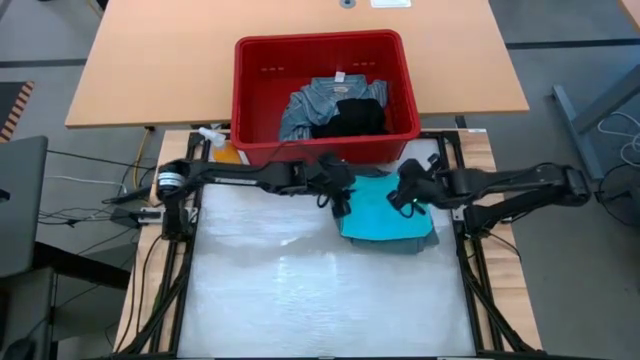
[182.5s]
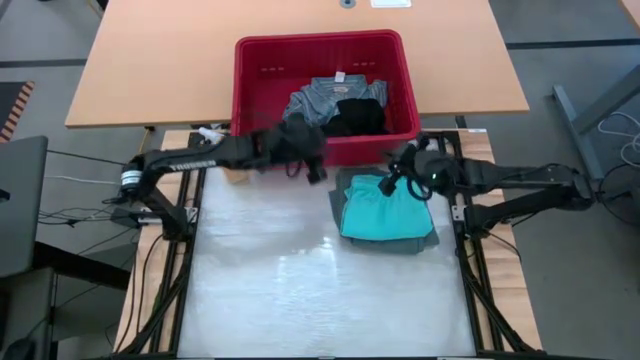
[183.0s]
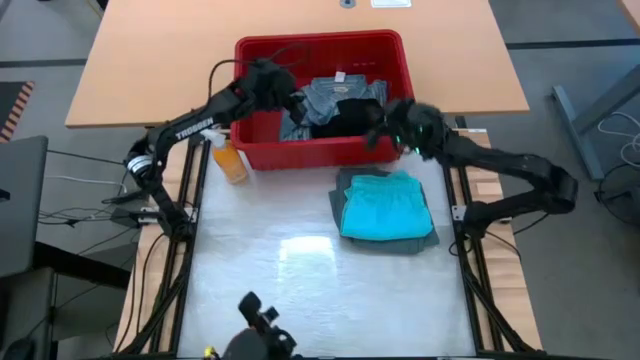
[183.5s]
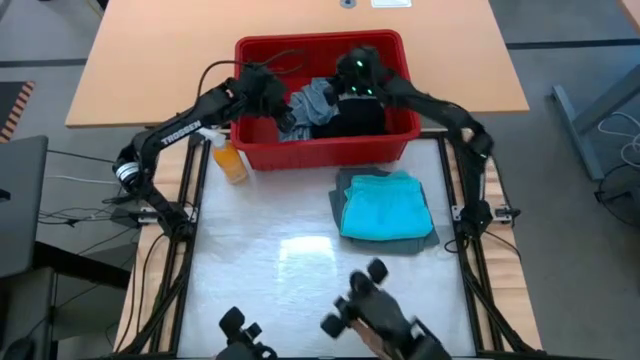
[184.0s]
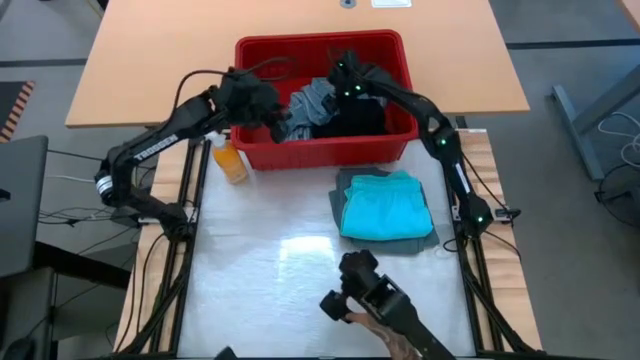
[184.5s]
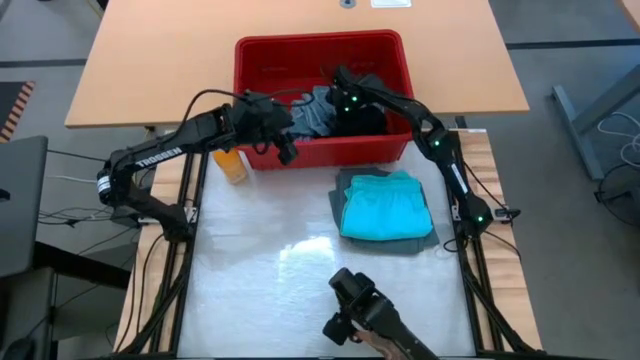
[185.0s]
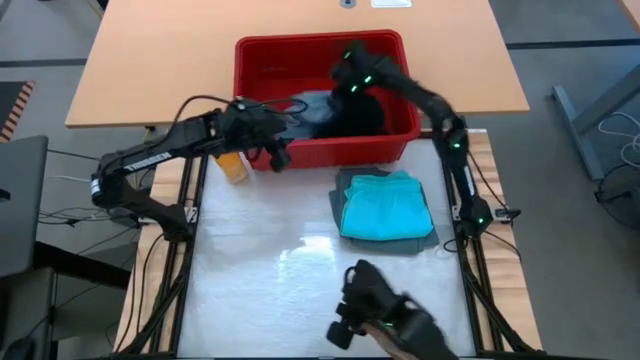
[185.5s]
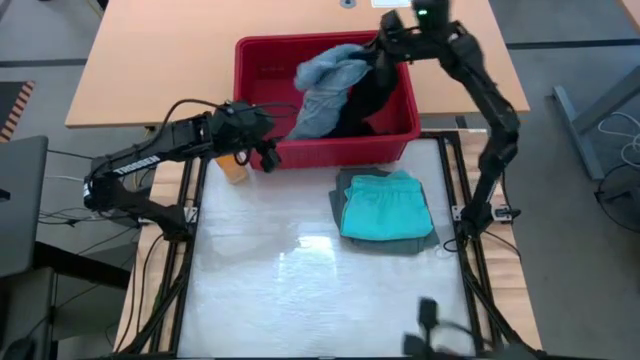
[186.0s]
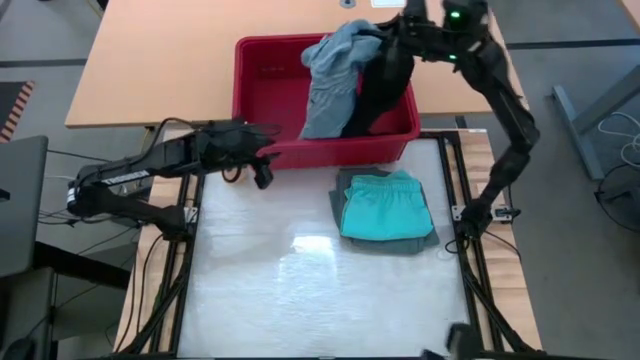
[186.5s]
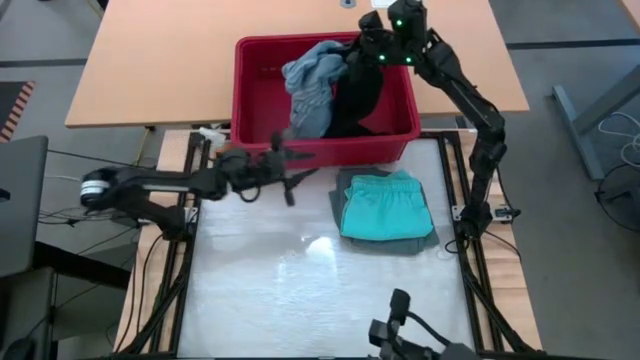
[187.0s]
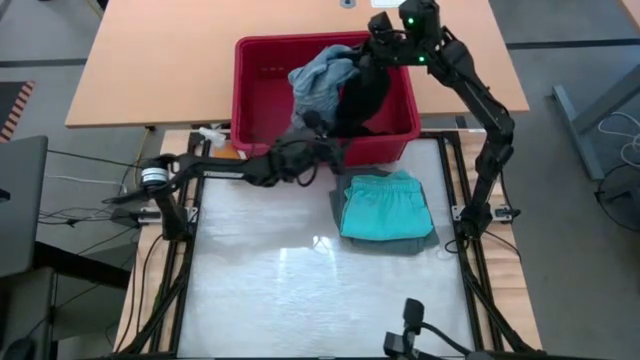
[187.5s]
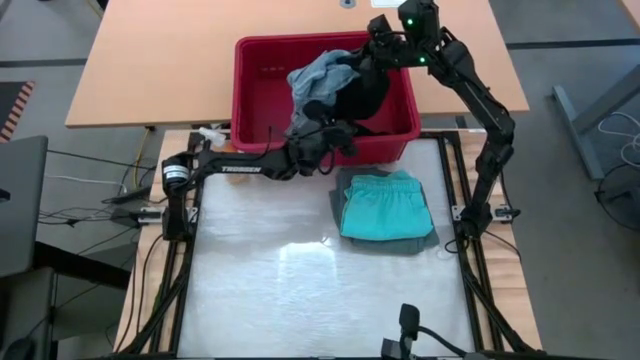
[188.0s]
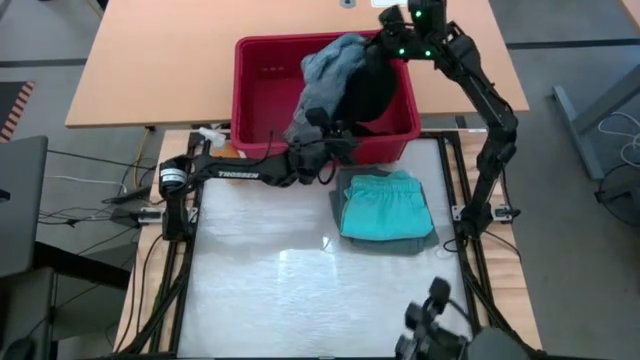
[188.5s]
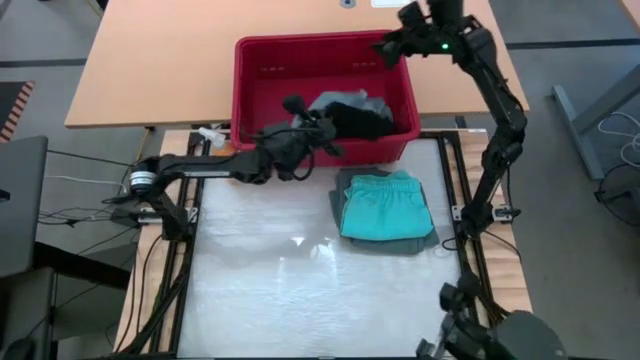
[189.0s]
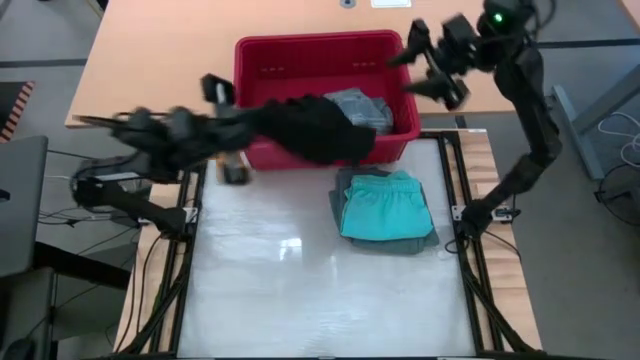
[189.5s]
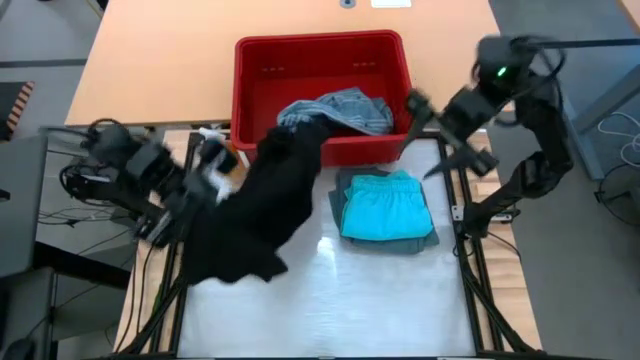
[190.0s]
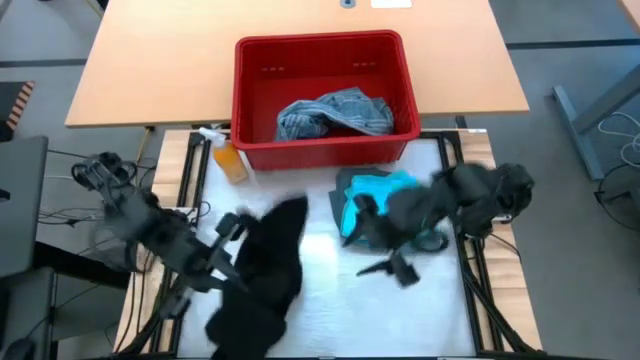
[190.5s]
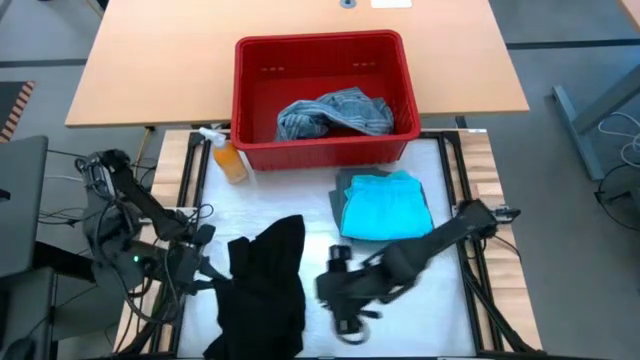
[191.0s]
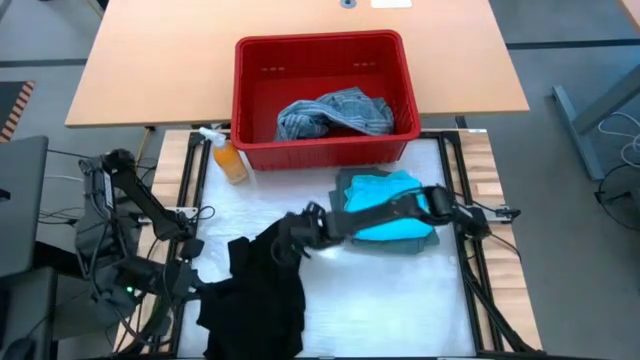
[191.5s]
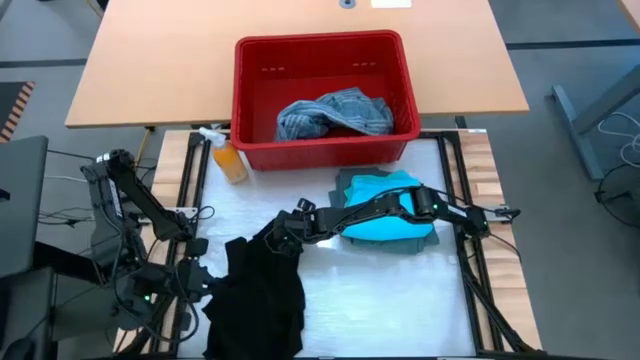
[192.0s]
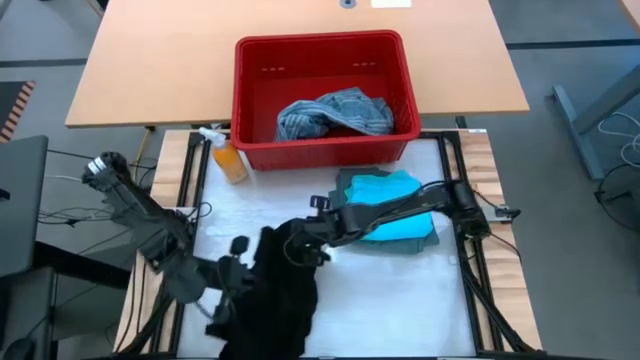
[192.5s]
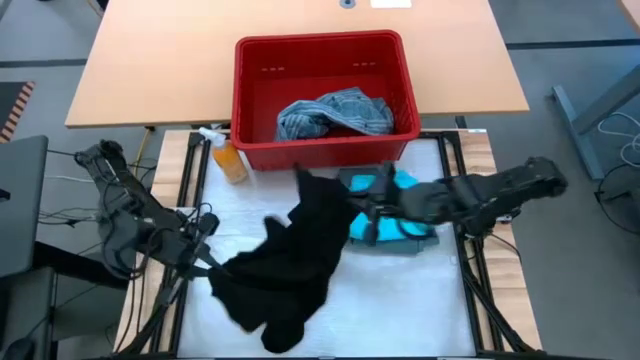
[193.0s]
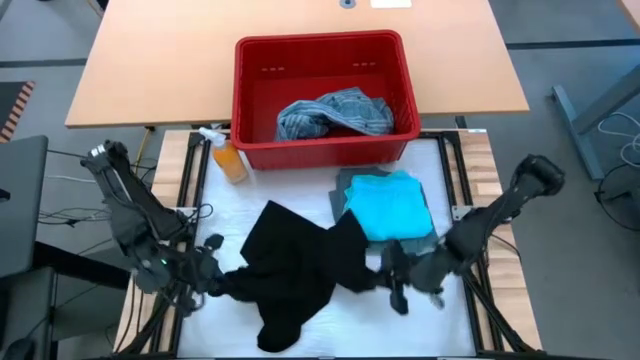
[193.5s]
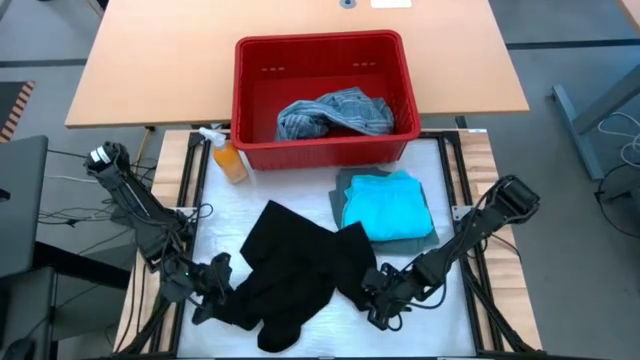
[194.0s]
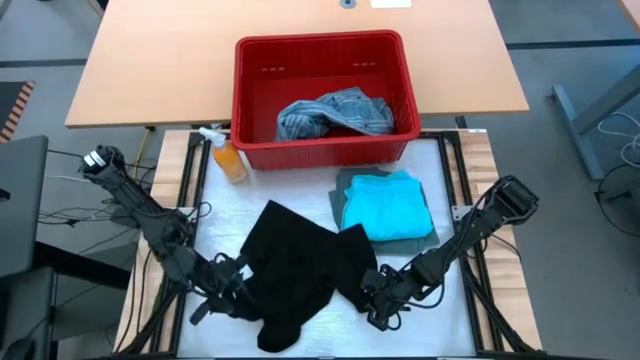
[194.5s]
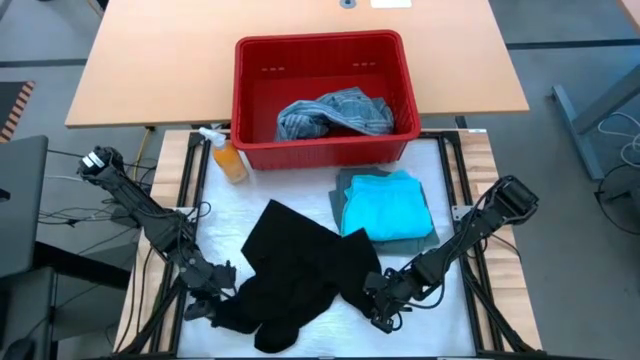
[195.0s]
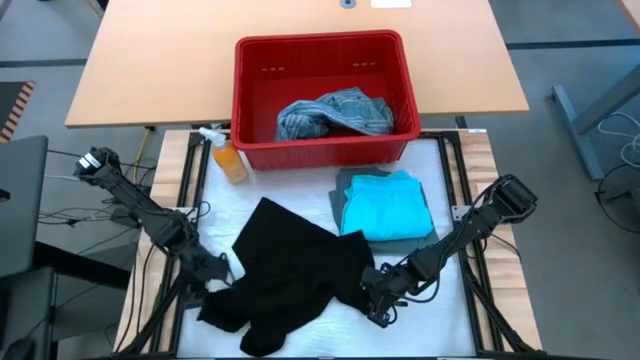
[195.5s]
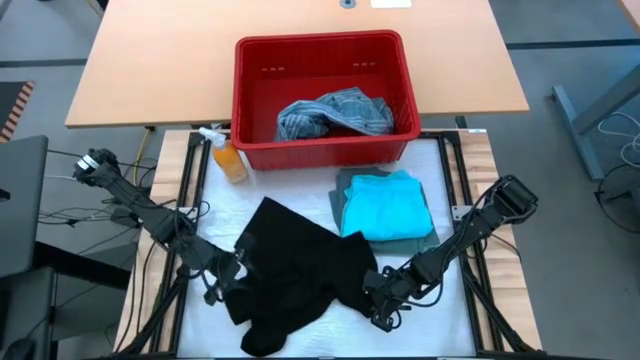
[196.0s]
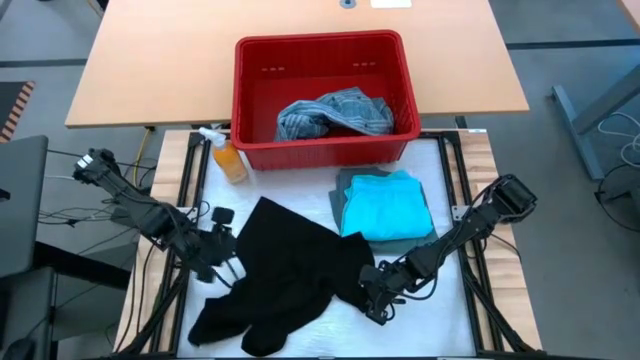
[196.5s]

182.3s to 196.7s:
Task: Fold Laundry from Bin
Remove the black shirt from the red bin on the table

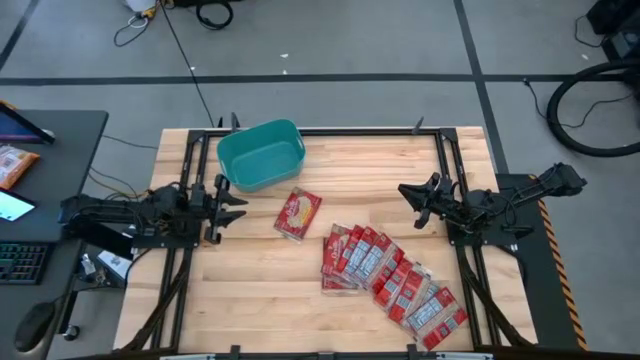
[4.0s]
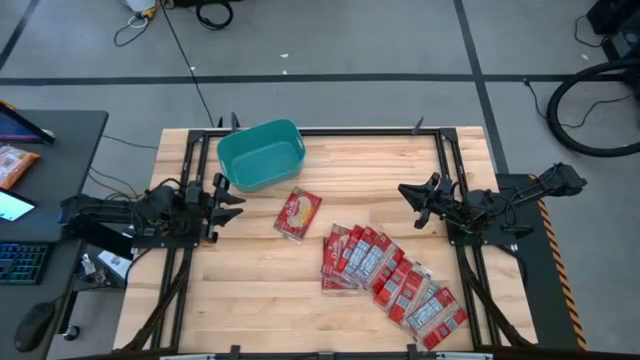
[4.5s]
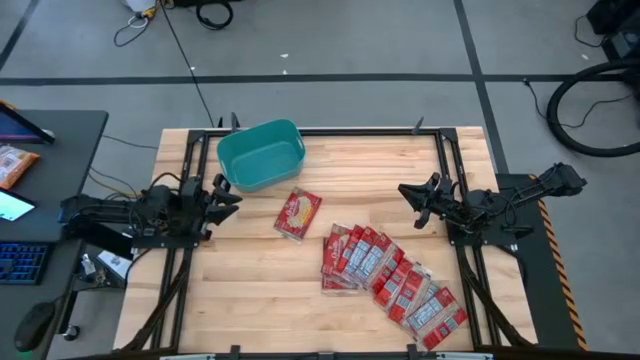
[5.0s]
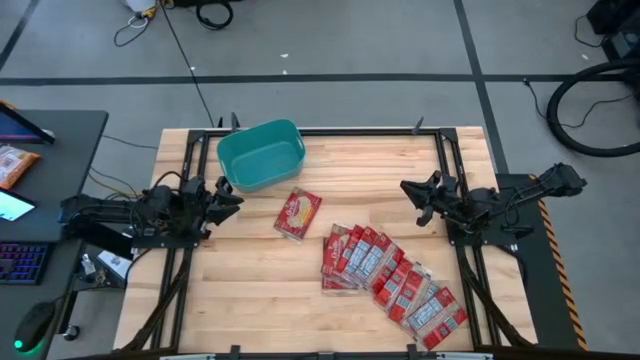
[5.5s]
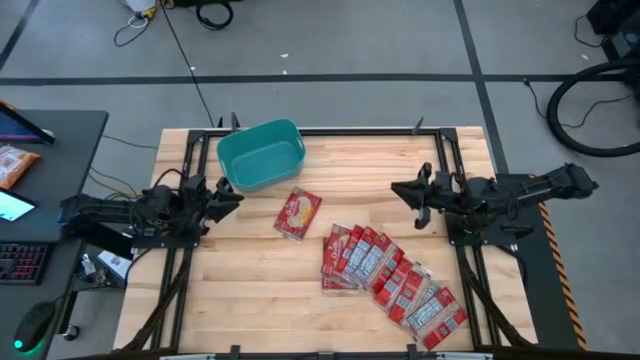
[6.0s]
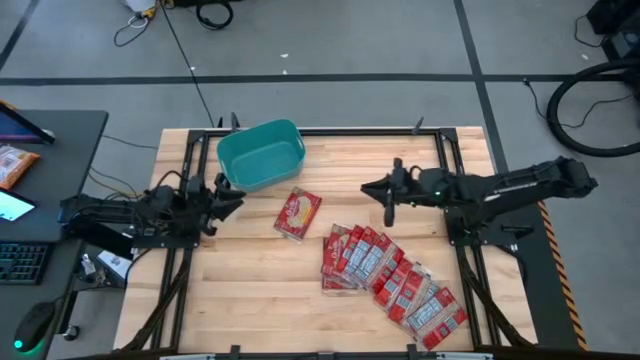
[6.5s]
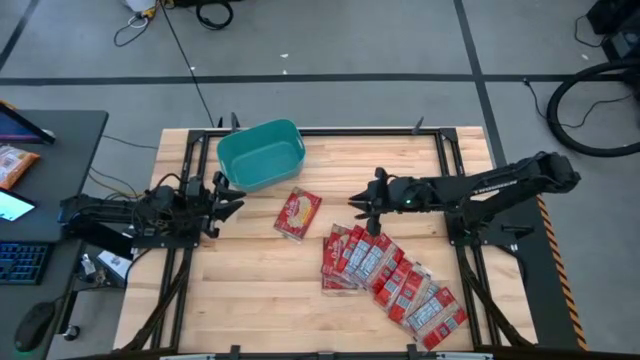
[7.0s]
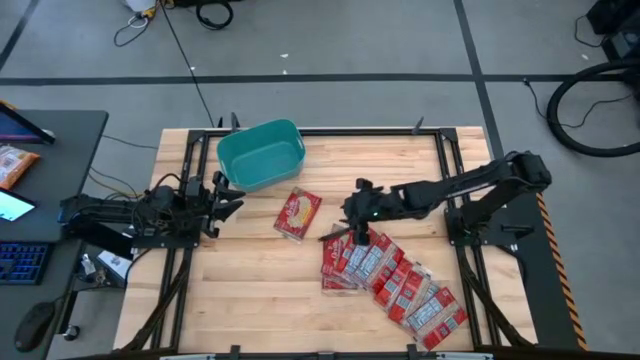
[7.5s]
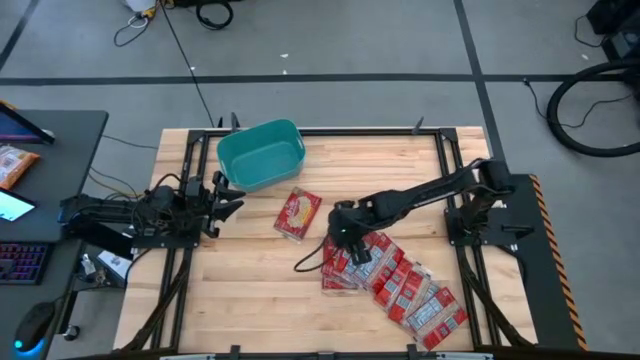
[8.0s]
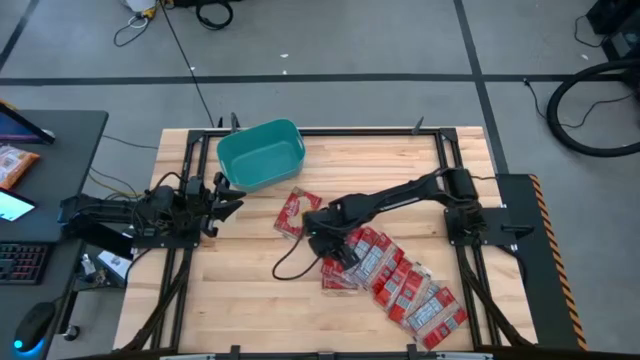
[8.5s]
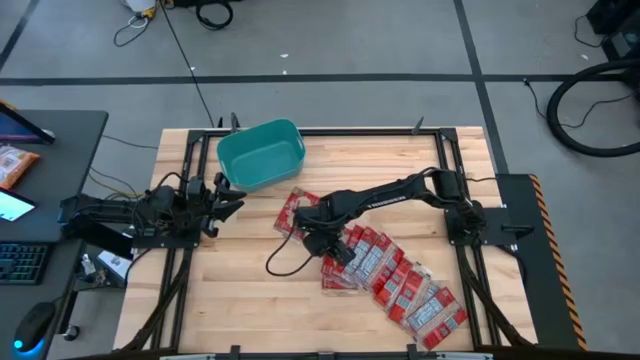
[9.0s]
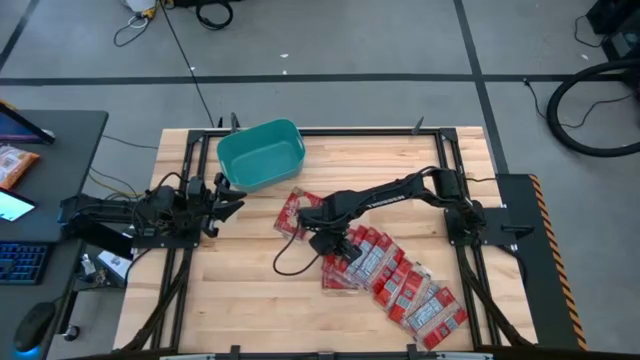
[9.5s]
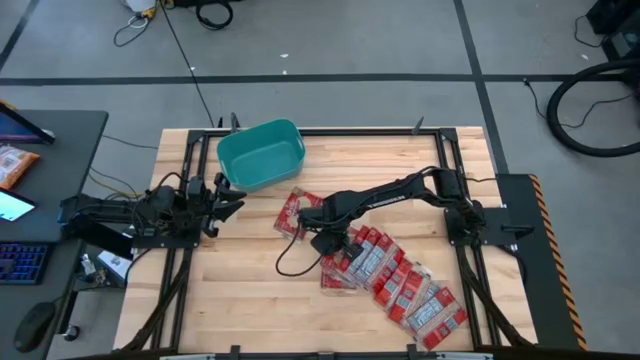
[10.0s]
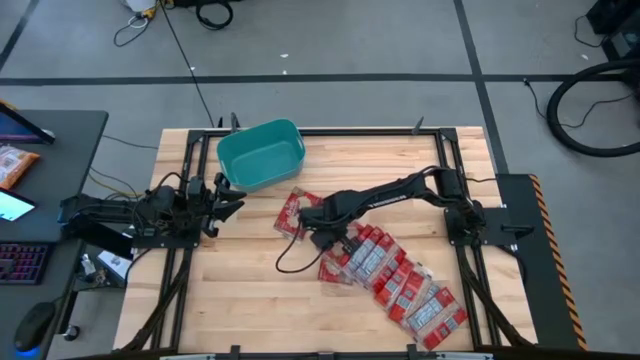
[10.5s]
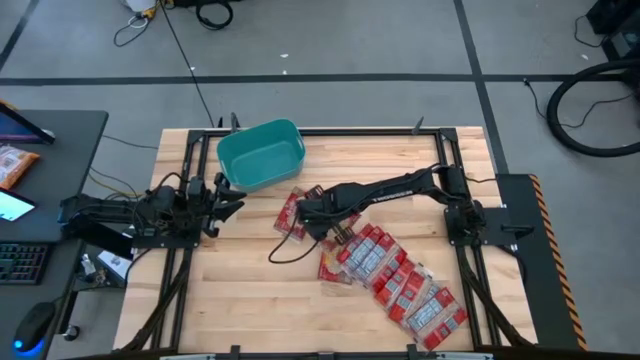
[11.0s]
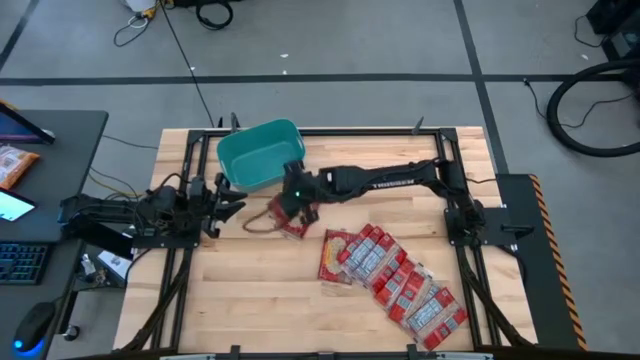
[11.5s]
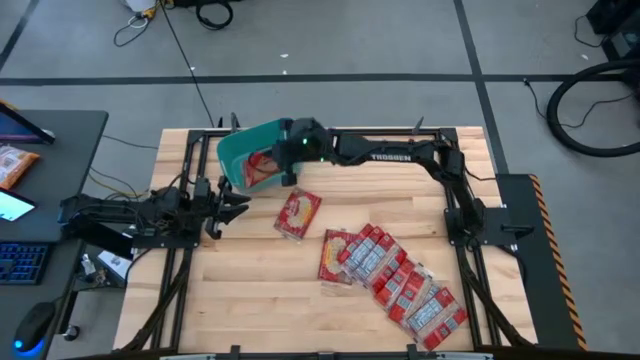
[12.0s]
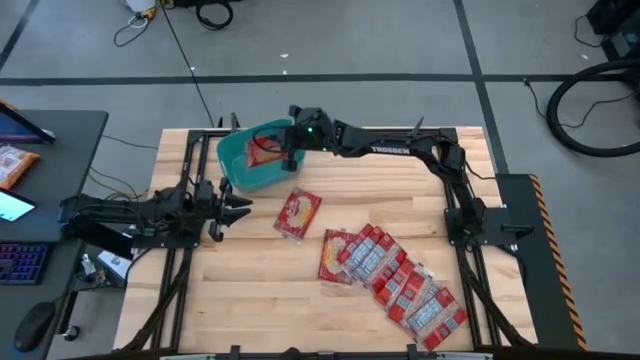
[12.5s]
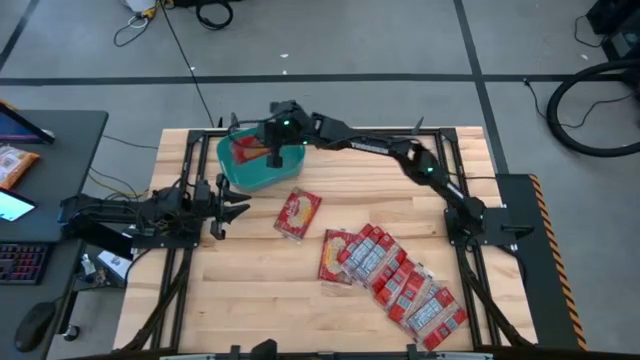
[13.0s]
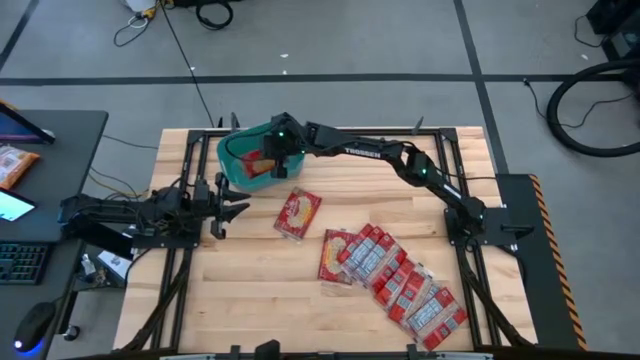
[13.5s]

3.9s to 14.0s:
Task: Sort popcorn bags into baskets
Put the popcorn bag into the green bin
